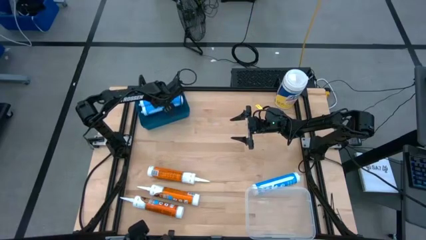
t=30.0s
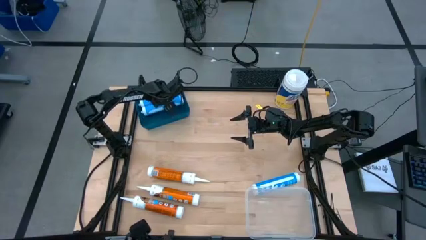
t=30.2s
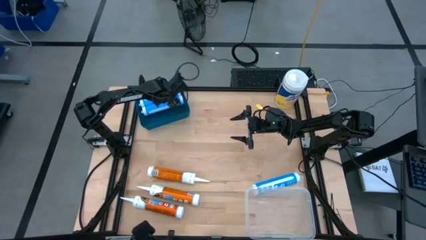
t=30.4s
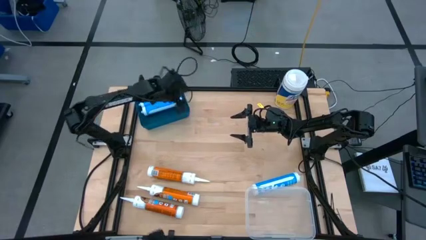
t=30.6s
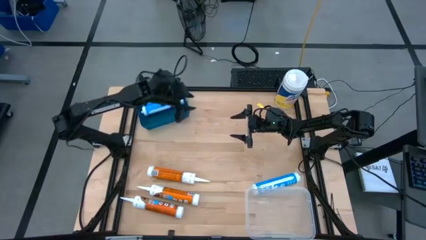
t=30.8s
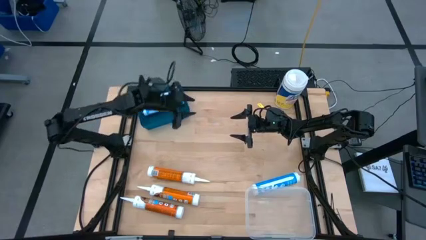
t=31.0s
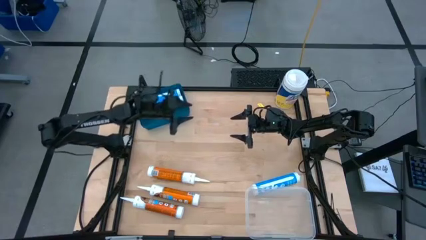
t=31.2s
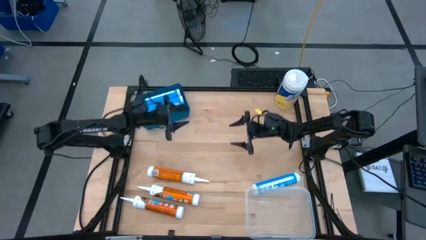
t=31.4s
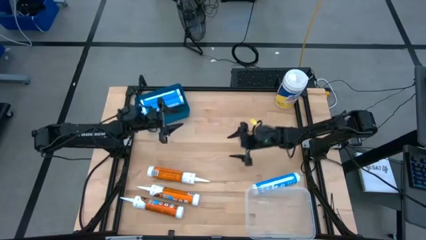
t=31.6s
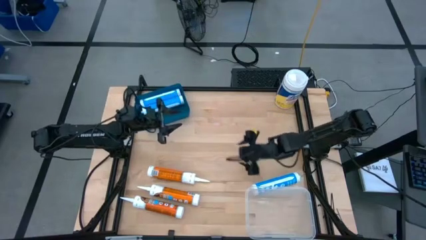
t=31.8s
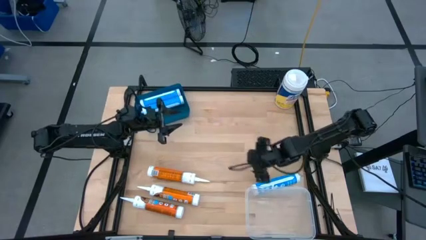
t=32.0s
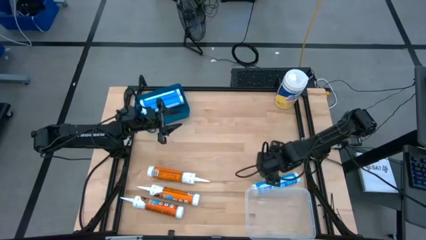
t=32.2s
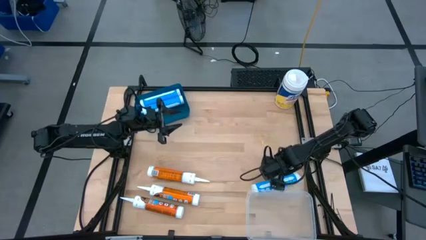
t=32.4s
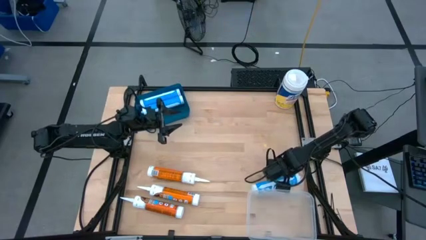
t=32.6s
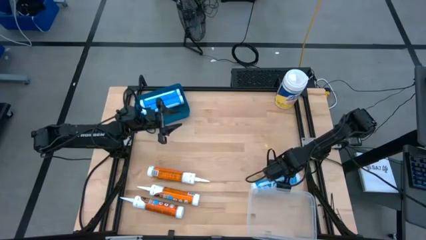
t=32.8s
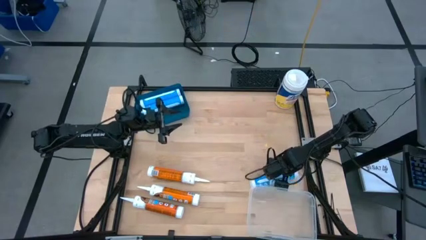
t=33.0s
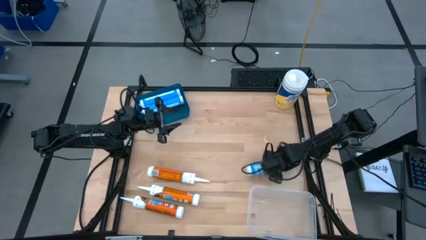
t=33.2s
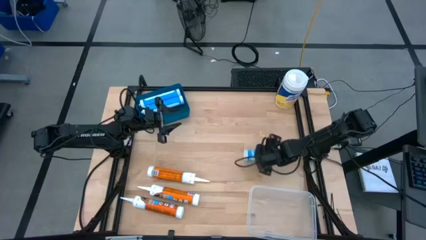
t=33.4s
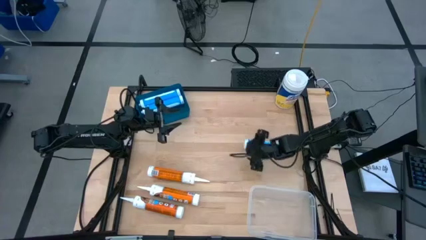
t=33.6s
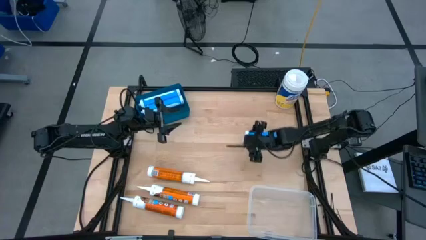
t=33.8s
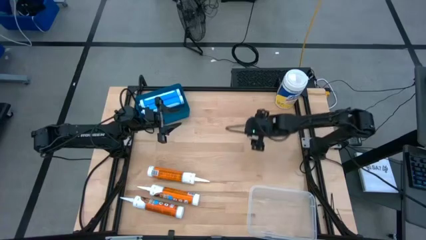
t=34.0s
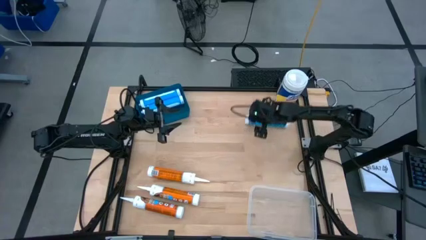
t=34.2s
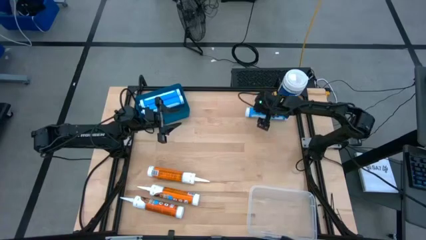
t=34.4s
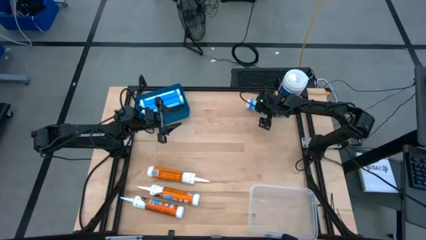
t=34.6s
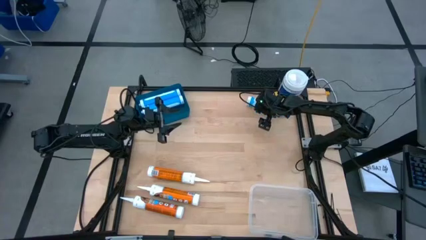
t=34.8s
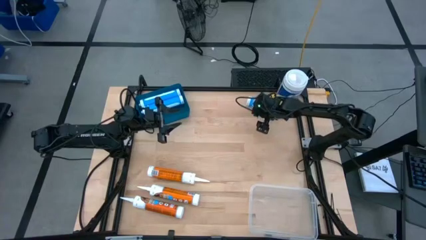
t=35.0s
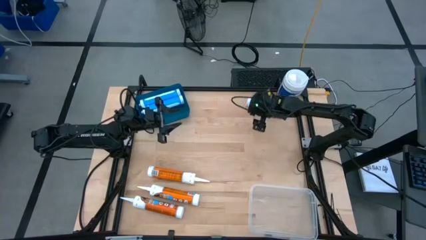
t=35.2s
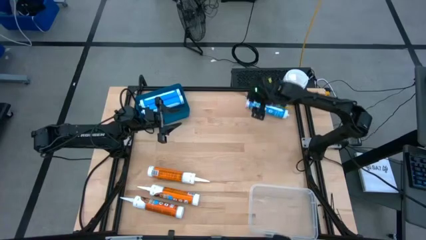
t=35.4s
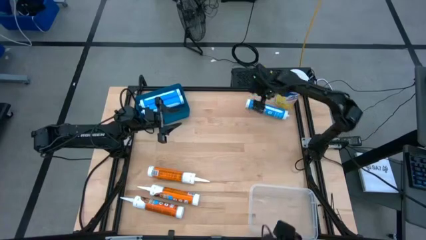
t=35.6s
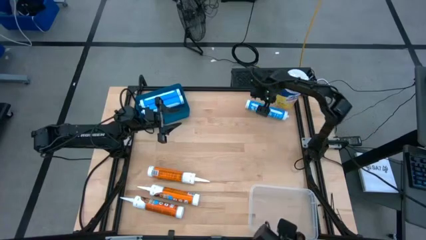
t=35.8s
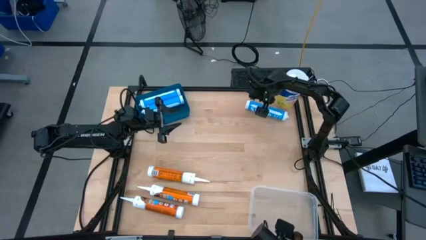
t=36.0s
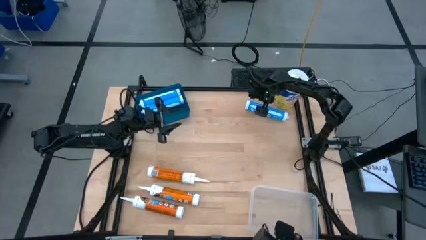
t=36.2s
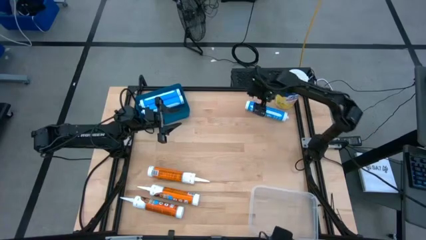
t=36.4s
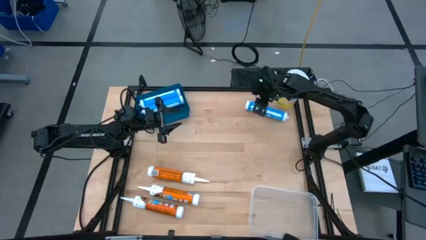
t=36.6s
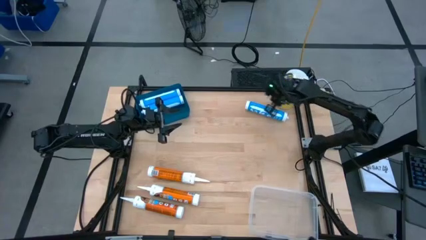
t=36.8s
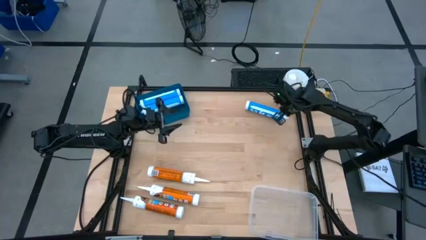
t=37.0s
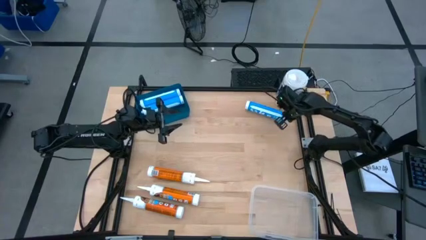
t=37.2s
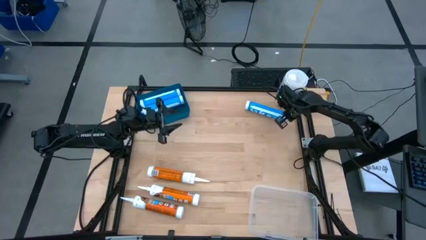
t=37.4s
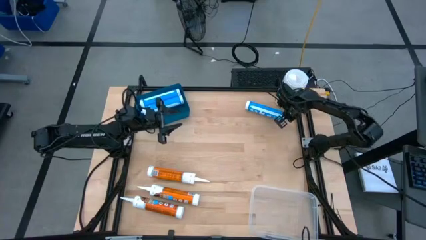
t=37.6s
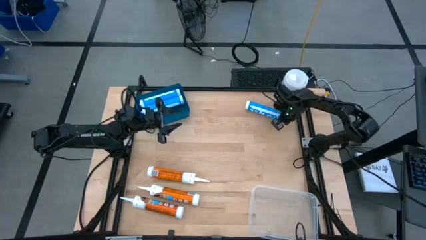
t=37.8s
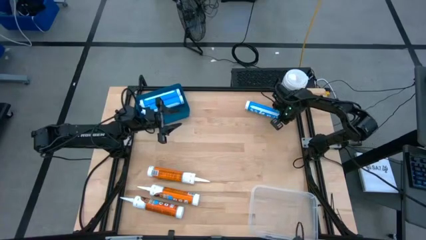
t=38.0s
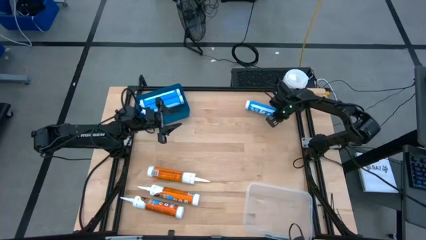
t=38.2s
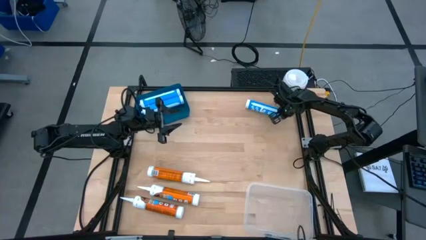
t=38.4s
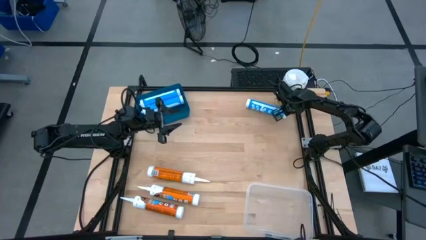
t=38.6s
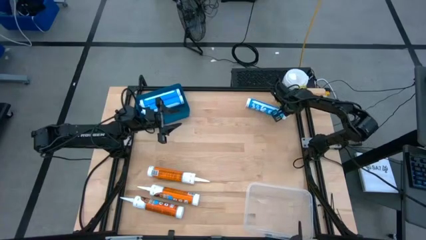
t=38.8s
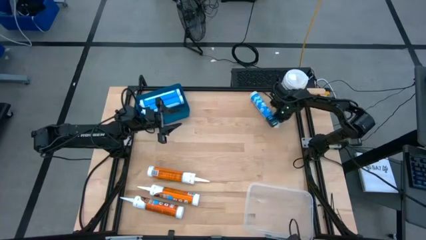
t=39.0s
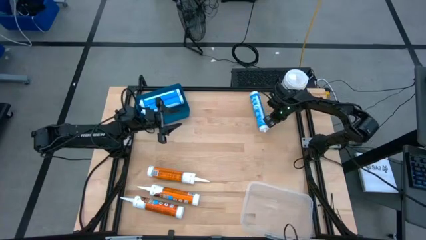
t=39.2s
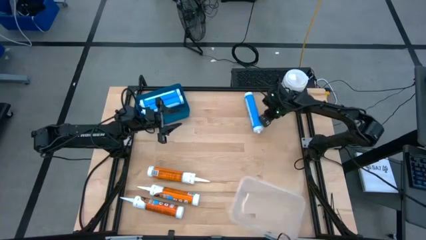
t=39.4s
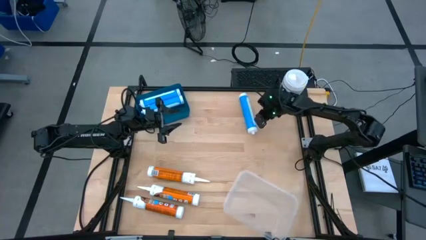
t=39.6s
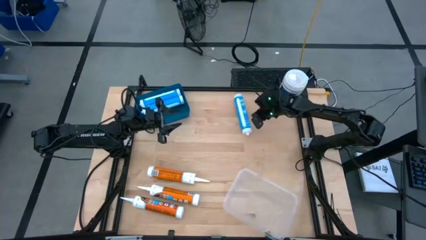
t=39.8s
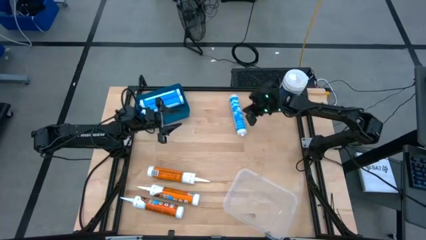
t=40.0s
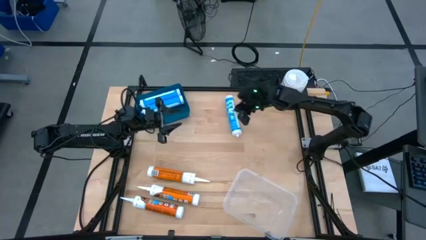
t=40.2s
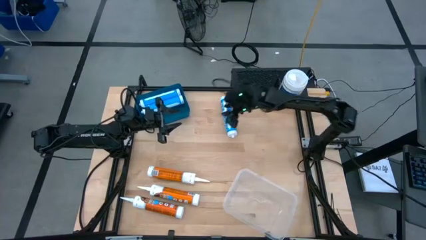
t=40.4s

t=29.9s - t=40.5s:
Task: Pick & place silicon tubes, Sealant and Lysol wipes
Put the blue sealant into the blue bin
